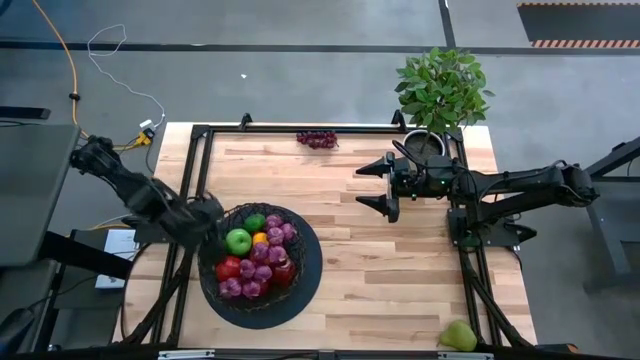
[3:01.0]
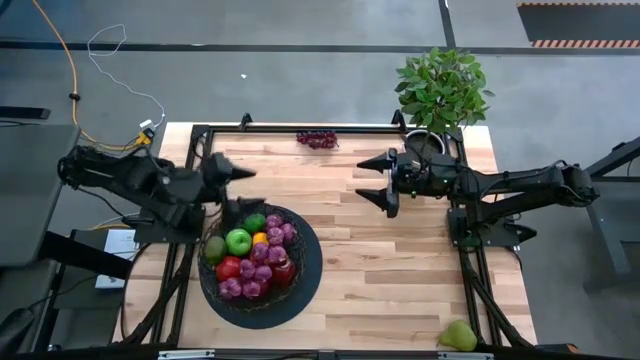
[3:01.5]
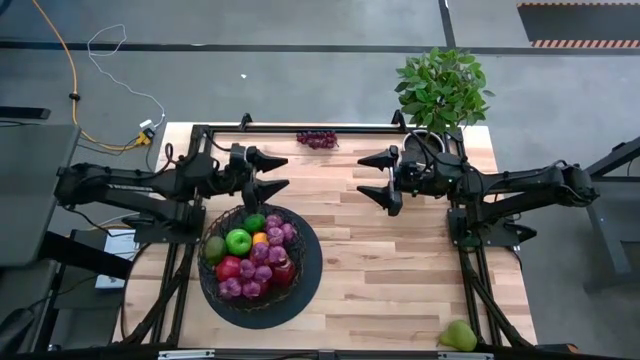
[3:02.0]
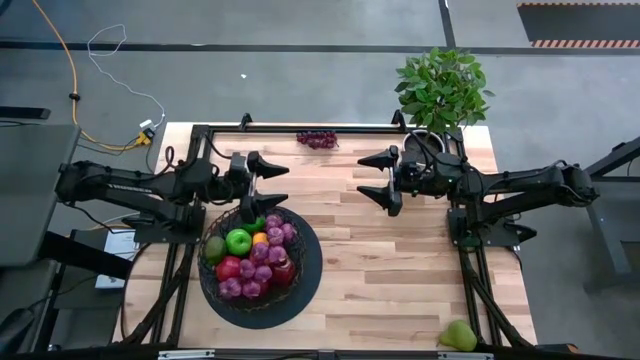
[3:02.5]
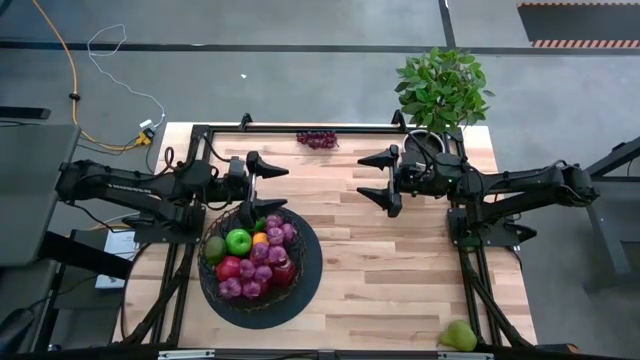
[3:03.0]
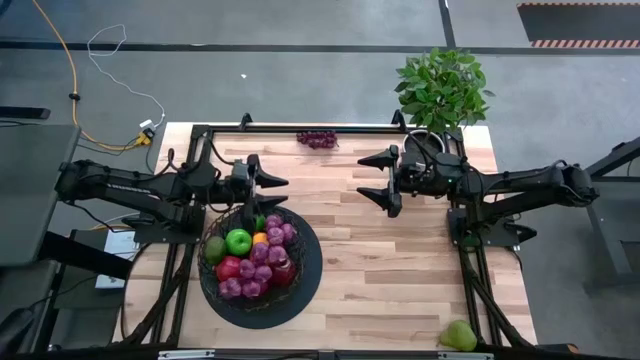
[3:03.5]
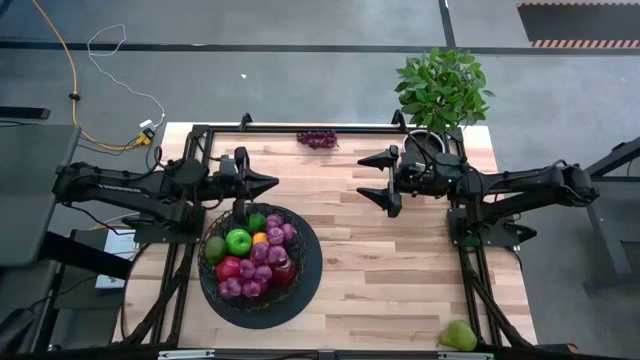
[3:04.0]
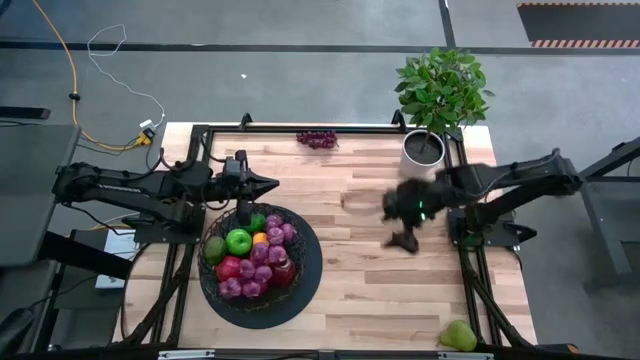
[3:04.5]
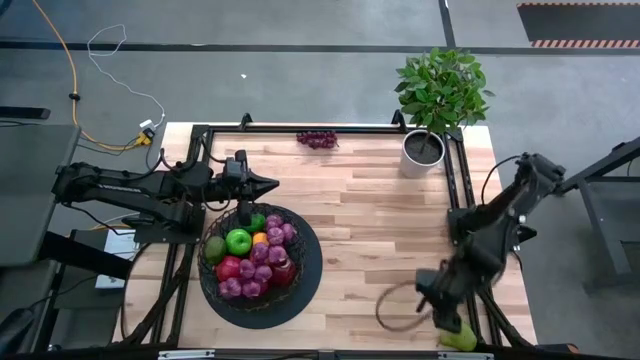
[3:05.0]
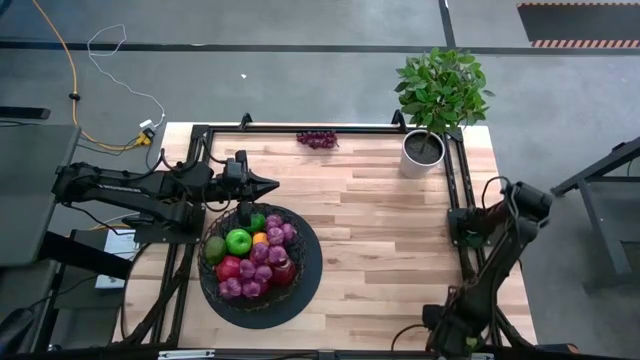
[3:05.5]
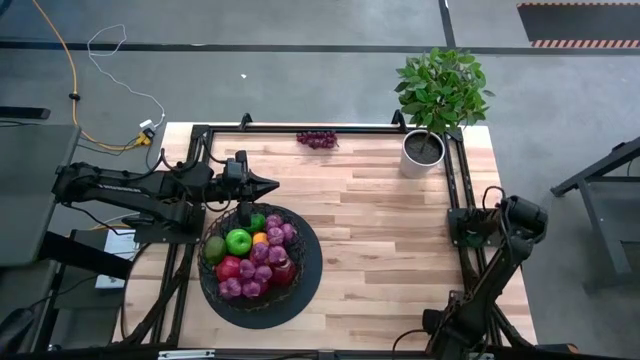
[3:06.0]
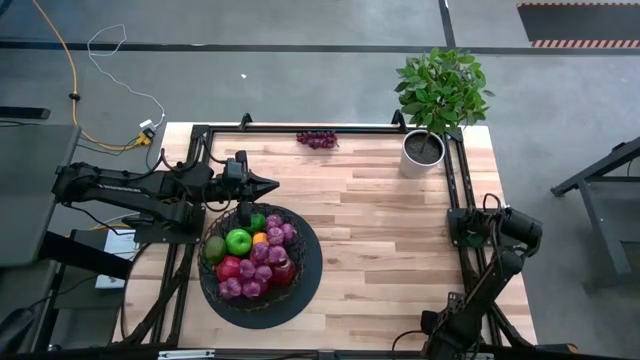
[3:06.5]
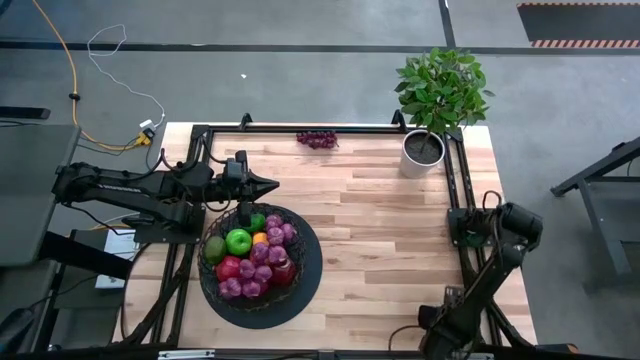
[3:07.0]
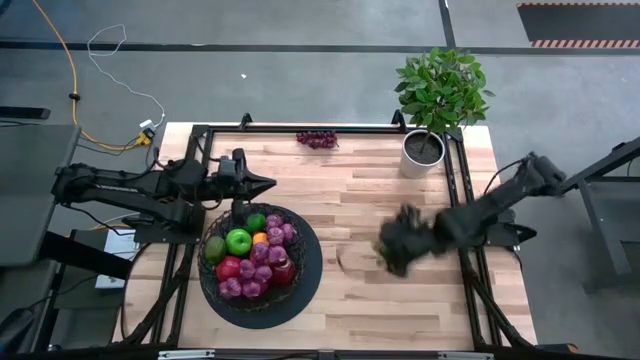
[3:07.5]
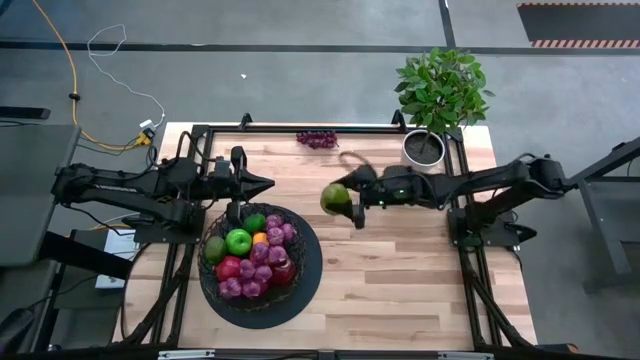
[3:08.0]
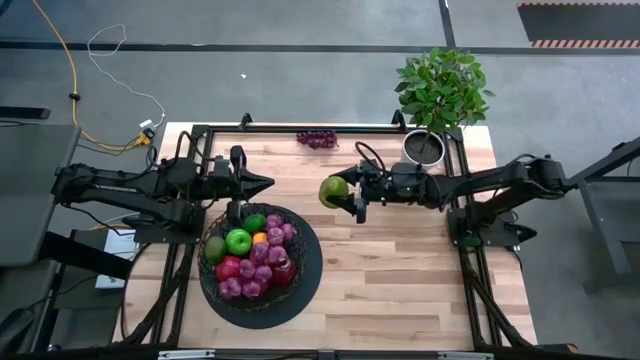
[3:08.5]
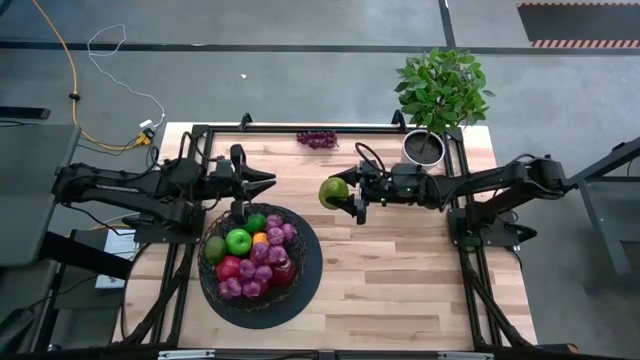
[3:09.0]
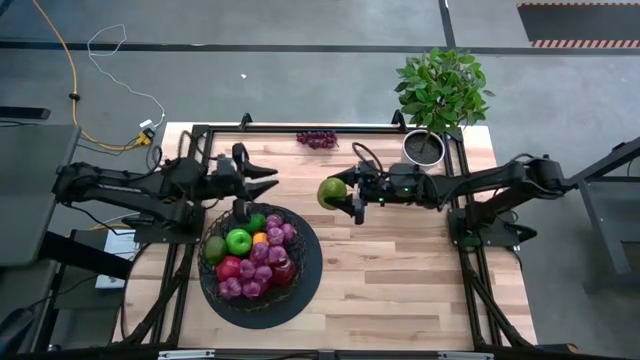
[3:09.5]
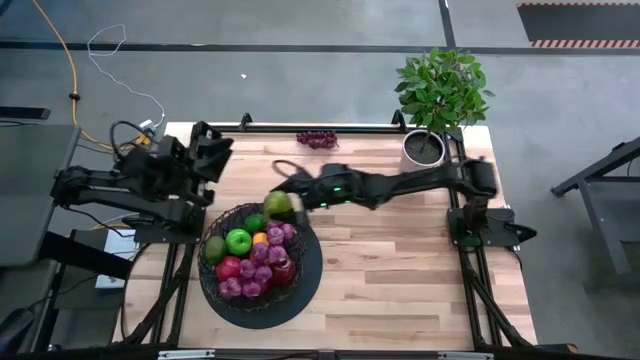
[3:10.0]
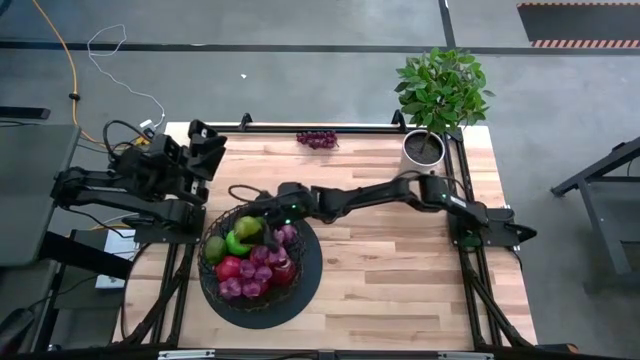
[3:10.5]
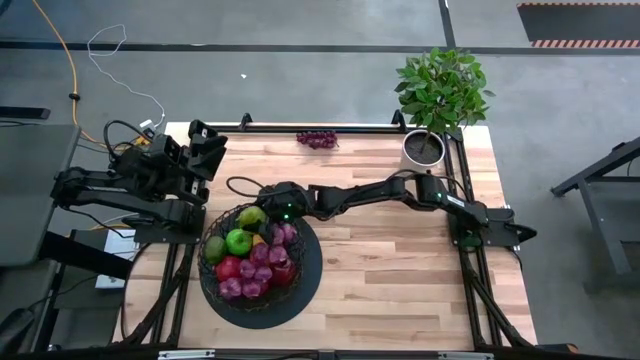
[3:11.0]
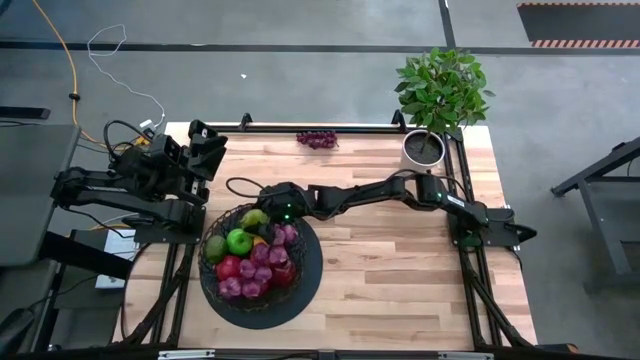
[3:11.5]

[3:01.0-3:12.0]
Task: Build produce basket
Put the pear into the black basket

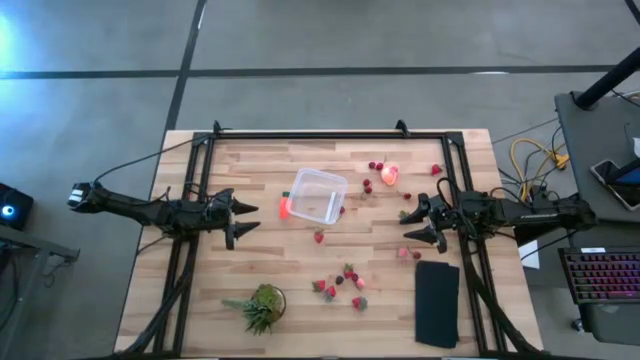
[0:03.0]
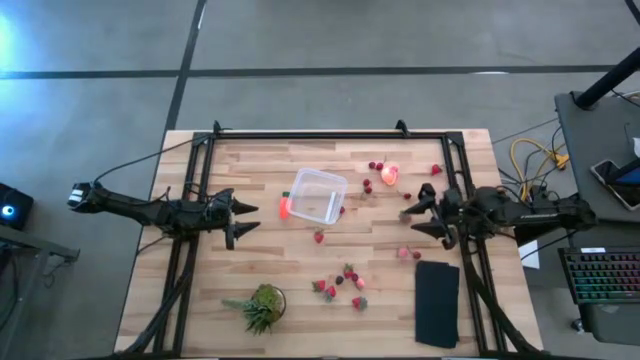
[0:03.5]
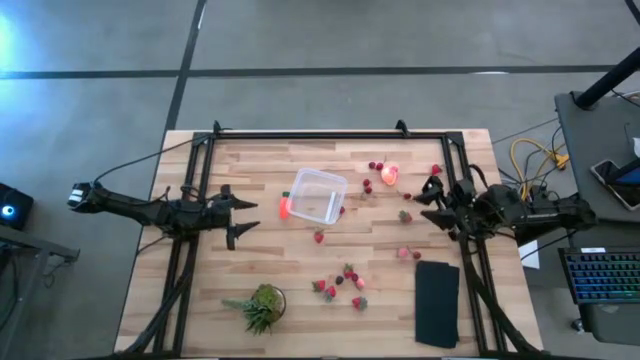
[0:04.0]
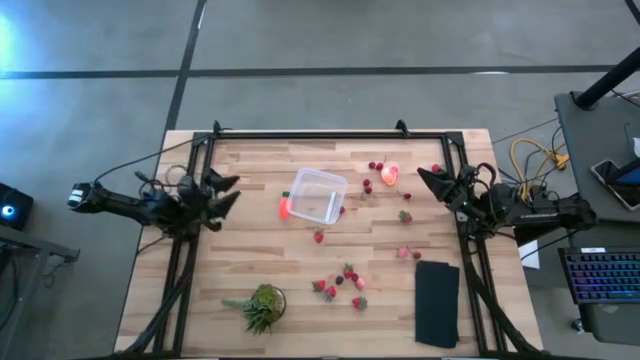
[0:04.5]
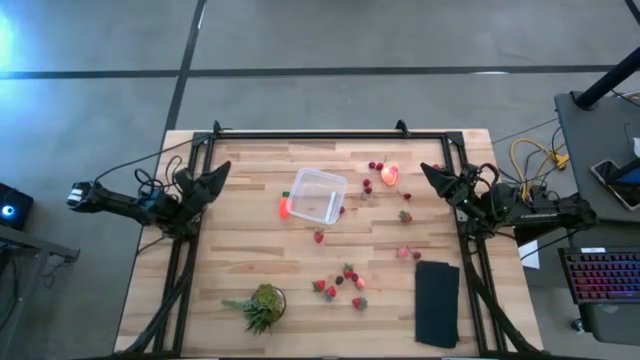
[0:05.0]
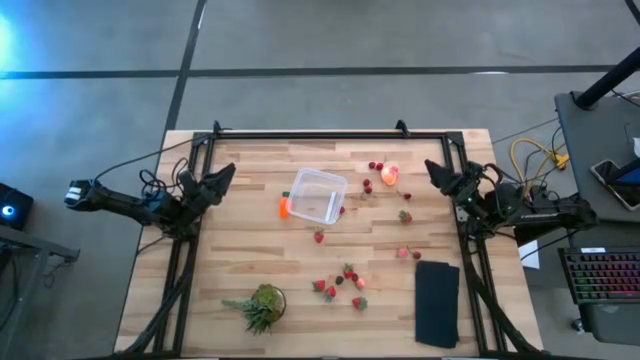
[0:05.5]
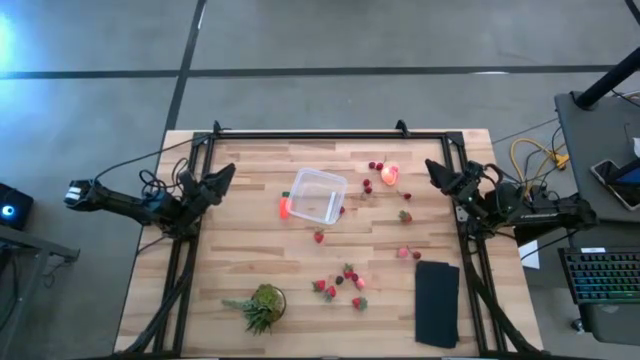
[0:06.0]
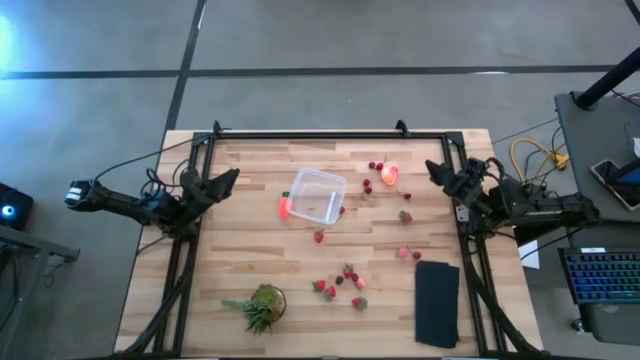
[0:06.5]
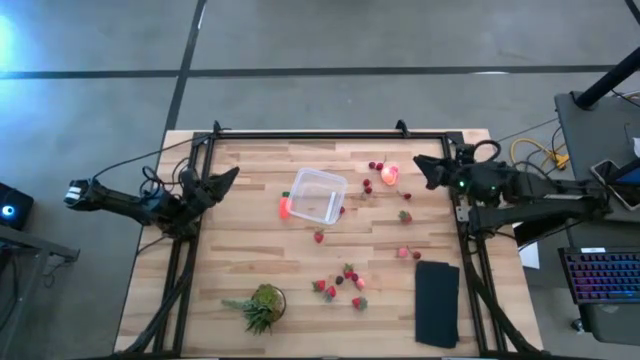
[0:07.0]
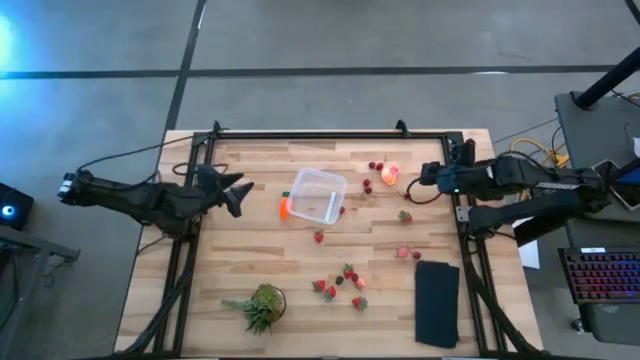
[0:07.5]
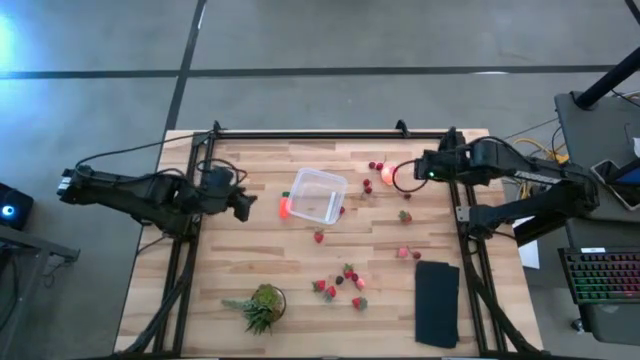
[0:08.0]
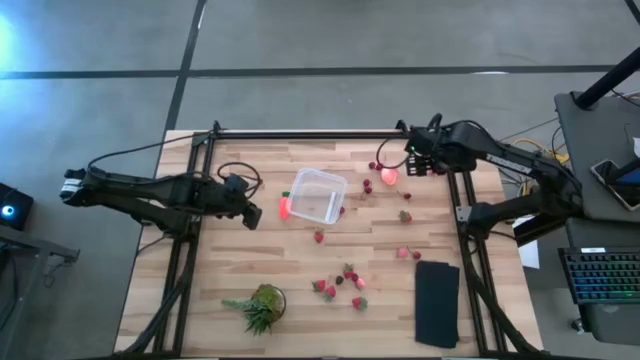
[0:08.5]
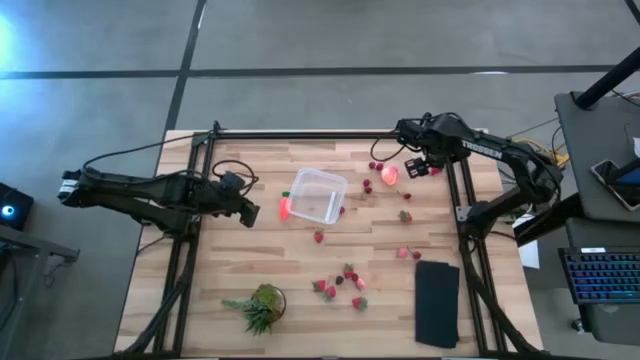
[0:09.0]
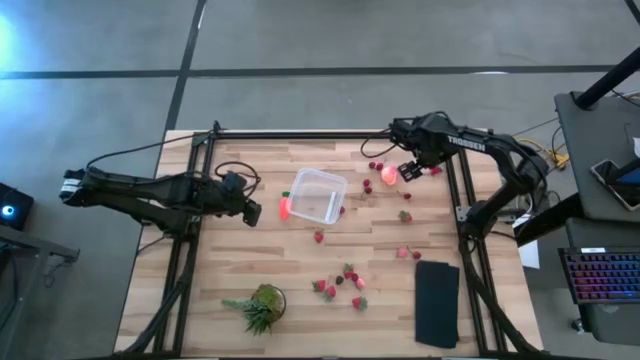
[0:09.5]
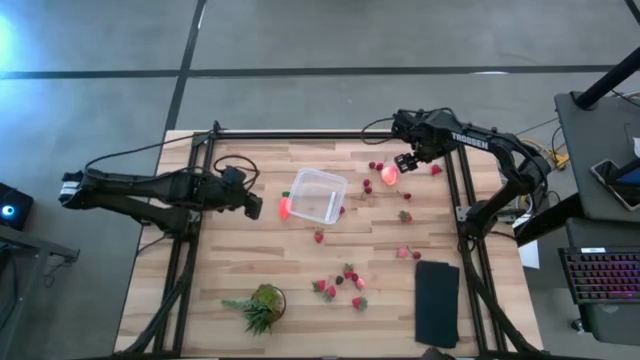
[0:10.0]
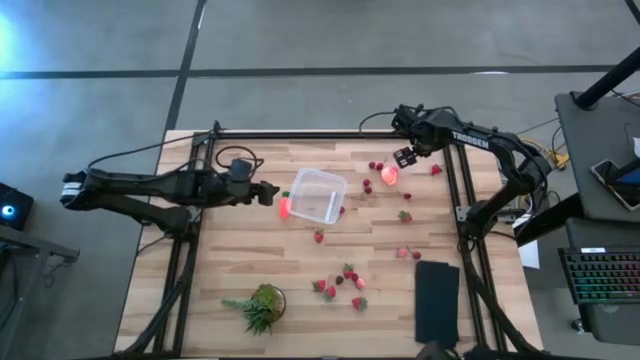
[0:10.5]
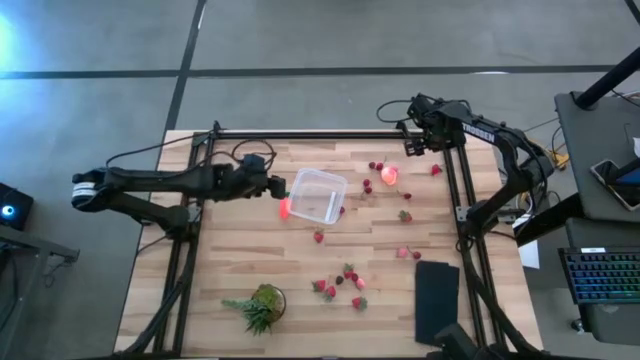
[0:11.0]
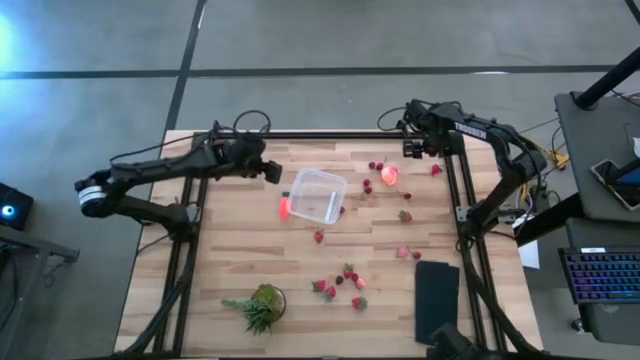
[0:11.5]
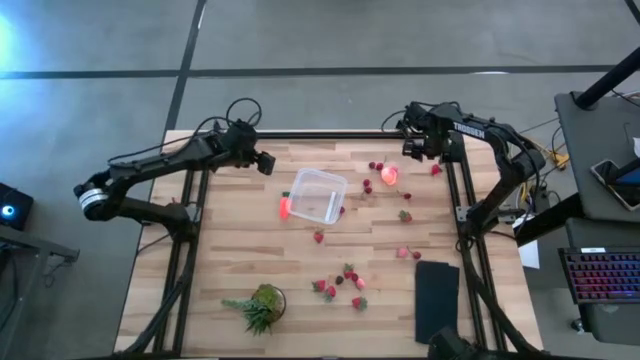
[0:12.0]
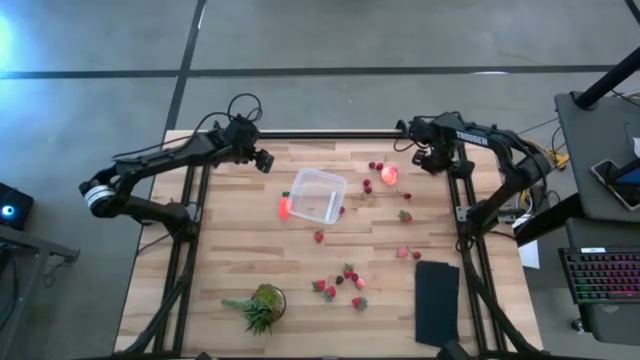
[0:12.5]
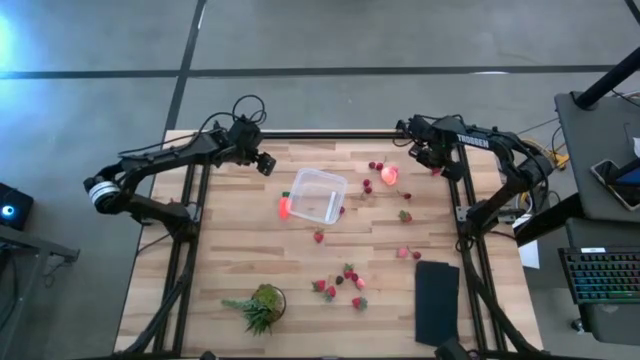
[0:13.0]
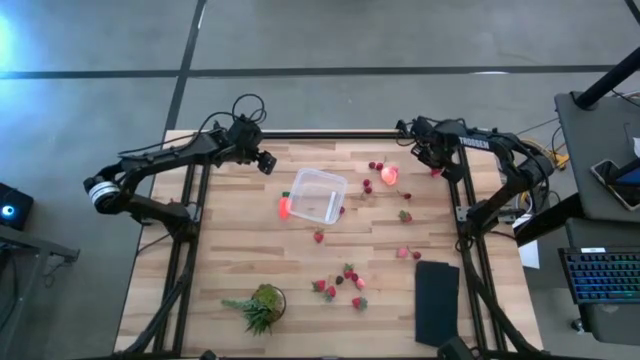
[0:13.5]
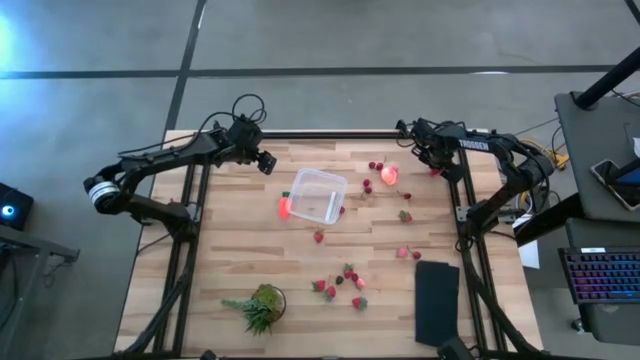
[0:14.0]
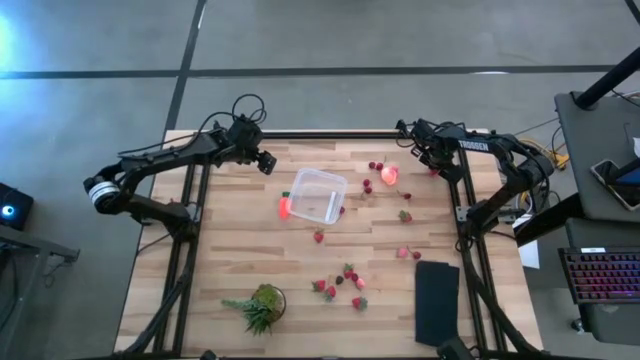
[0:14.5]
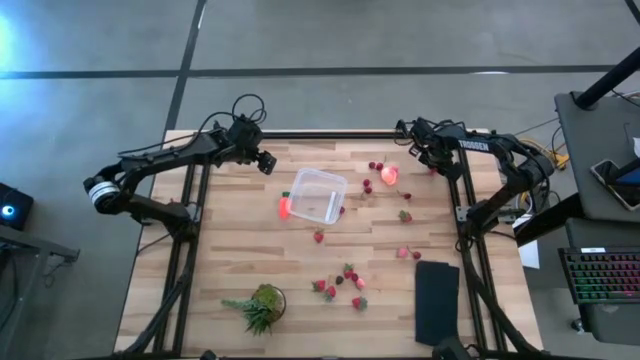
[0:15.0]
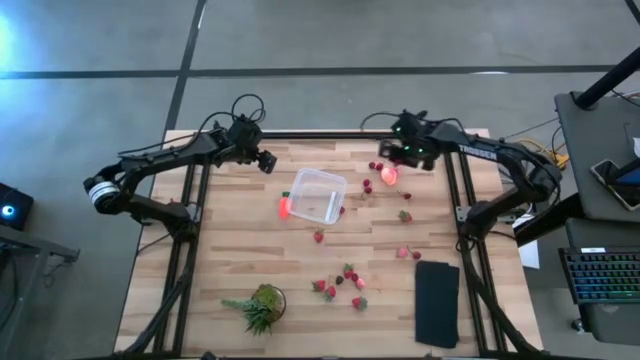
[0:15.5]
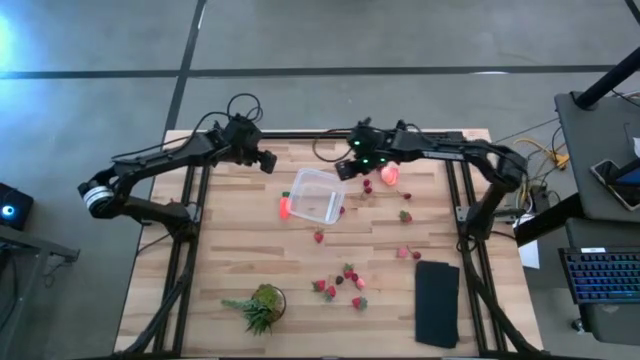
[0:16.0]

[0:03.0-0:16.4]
Task: Pick and placing Produce into tupperware
Put the red strawberry into the transparent bin
